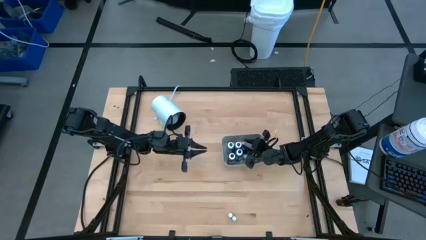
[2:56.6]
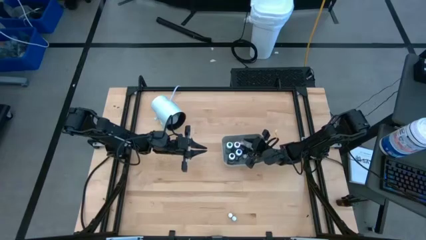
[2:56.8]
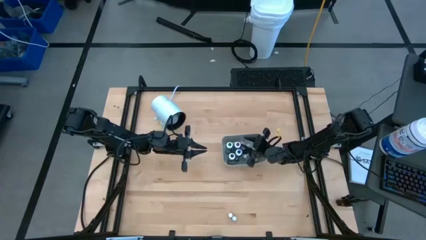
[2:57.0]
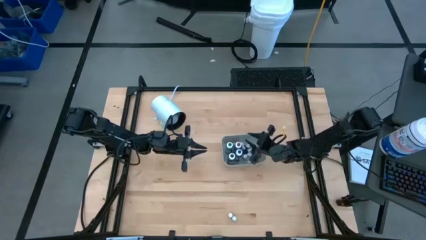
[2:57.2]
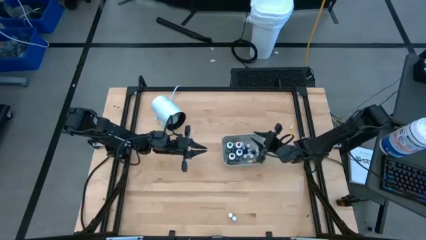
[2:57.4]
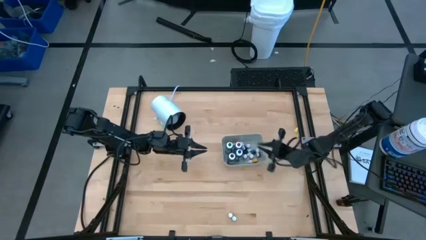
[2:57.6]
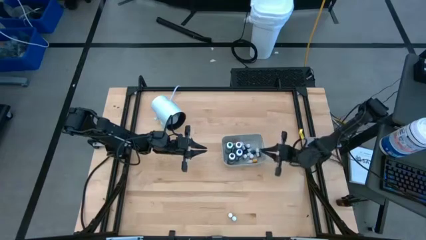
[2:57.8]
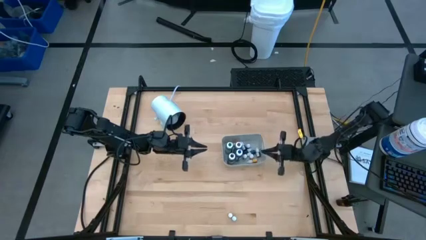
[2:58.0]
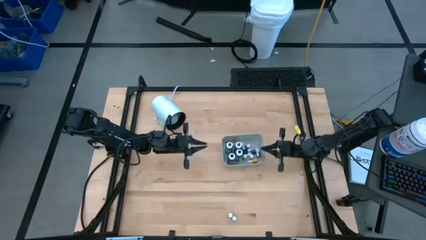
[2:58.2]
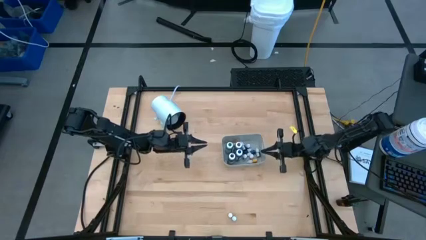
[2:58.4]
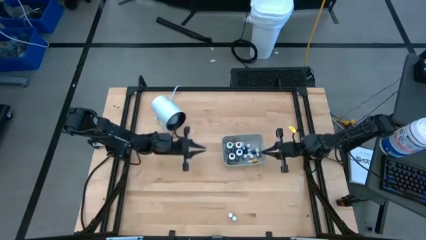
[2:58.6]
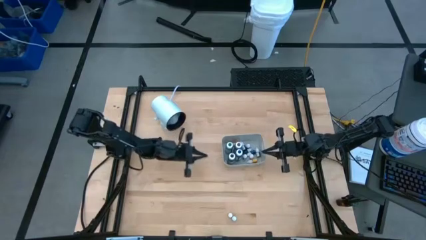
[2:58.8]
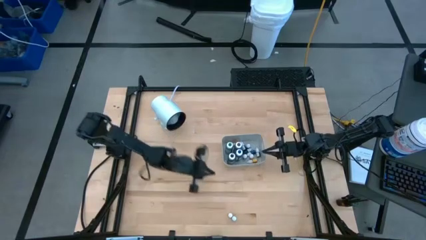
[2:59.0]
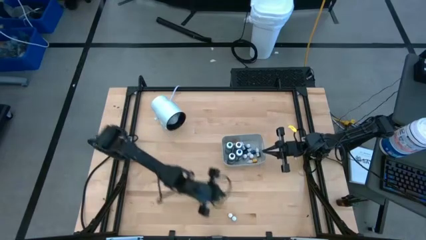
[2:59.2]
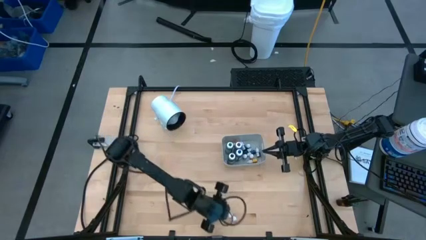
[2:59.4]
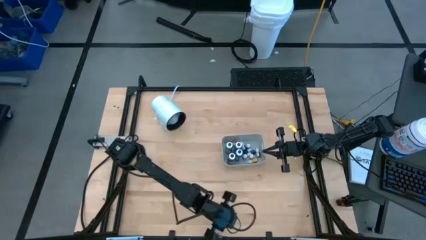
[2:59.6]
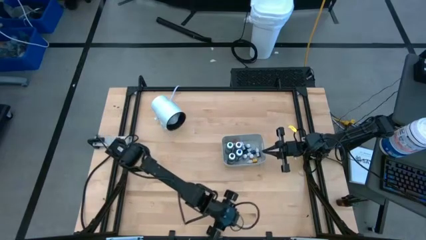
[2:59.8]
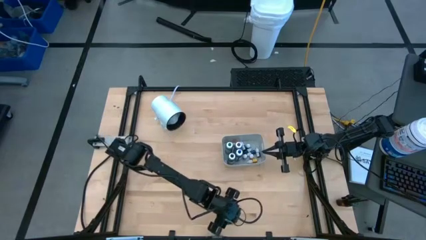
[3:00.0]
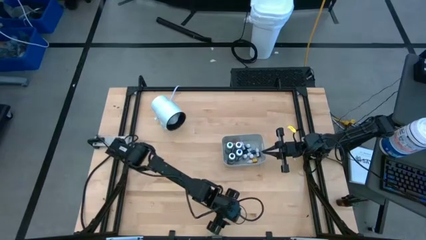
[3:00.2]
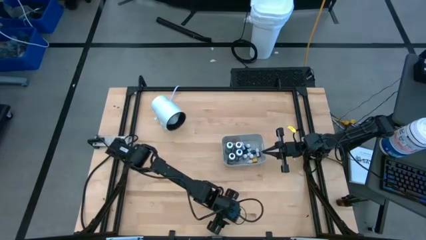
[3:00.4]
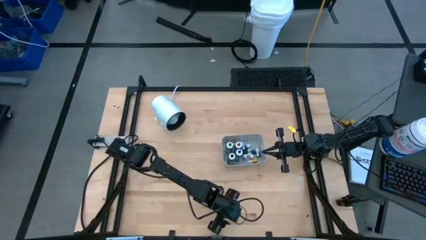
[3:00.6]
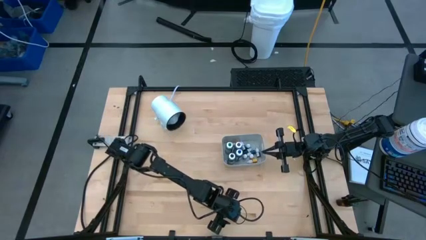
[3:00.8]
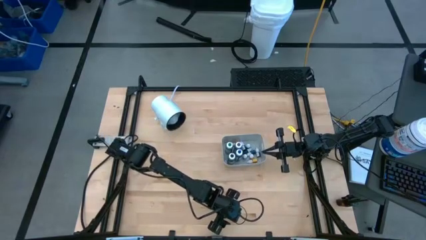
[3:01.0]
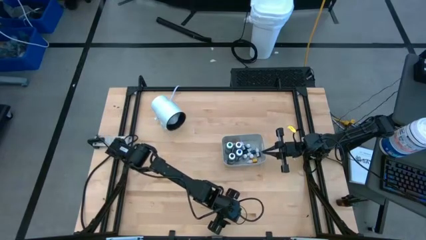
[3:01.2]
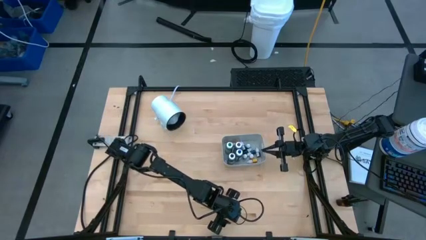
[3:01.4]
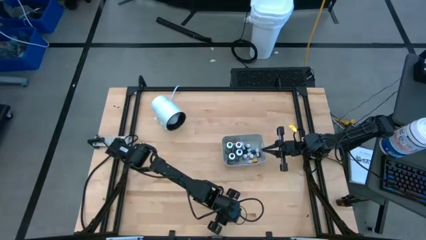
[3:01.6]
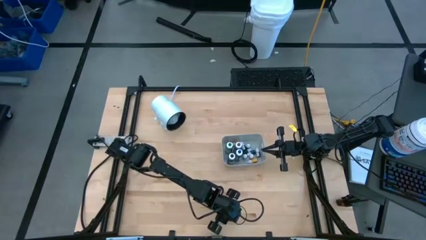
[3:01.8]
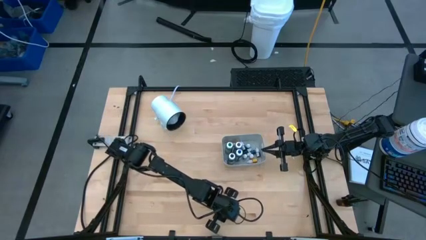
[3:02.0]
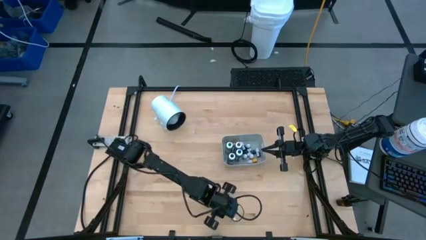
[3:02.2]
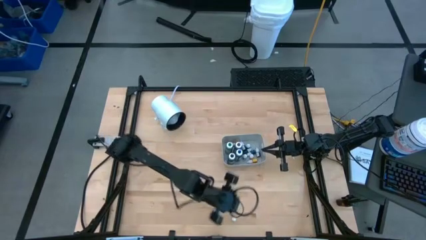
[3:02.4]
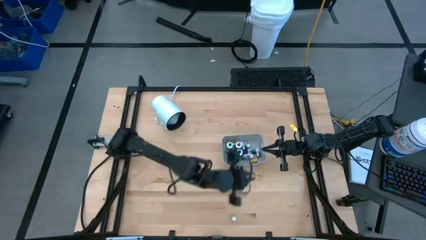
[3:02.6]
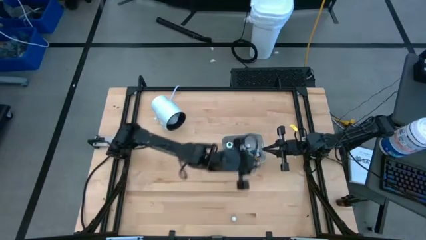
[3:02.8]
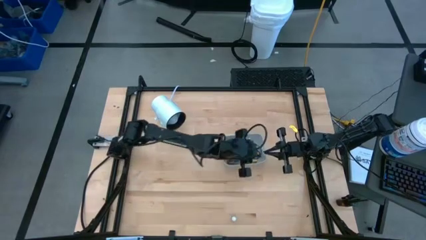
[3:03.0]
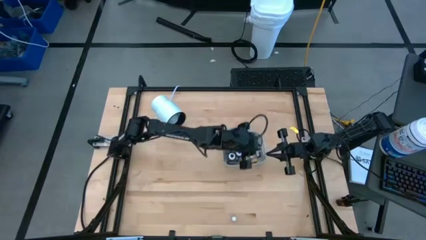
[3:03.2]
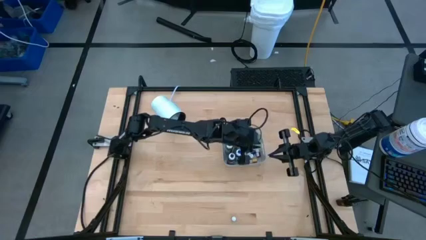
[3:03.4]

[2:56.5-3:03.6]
Task: Pick & Place food coloring
Put the small yellow food coloring bottle into the gray bin

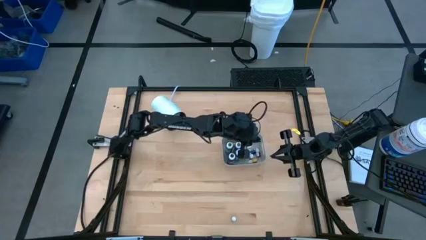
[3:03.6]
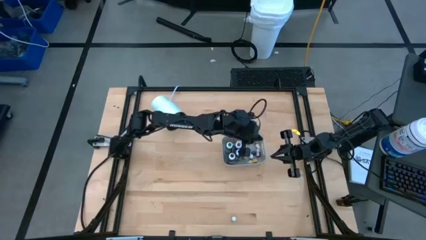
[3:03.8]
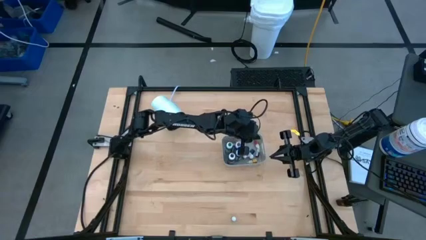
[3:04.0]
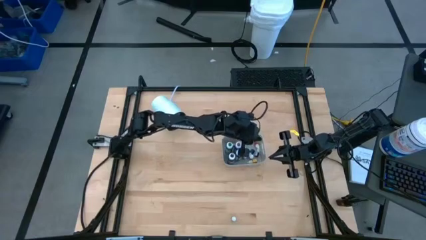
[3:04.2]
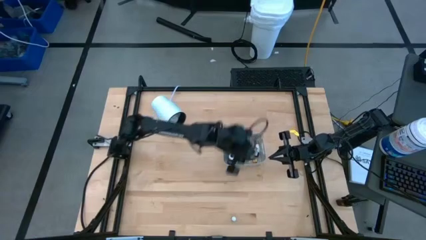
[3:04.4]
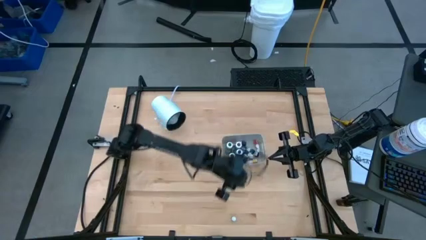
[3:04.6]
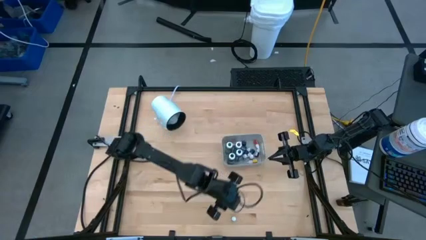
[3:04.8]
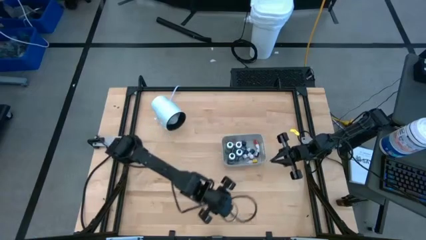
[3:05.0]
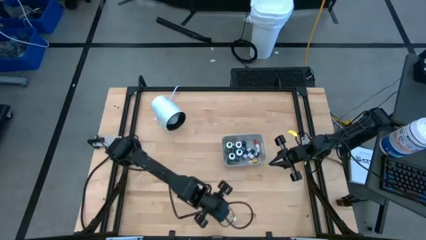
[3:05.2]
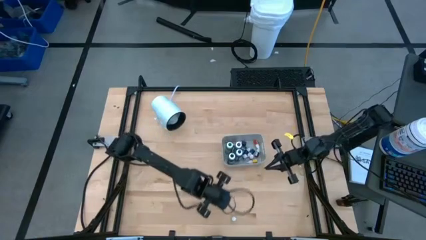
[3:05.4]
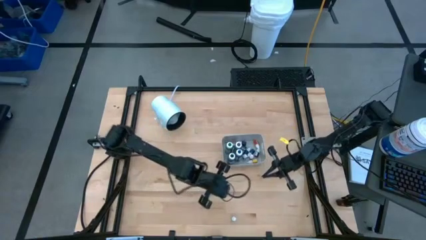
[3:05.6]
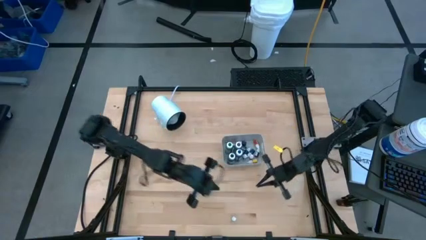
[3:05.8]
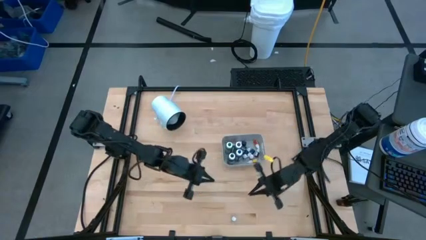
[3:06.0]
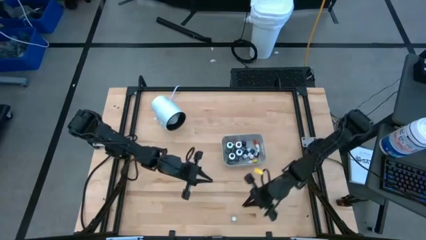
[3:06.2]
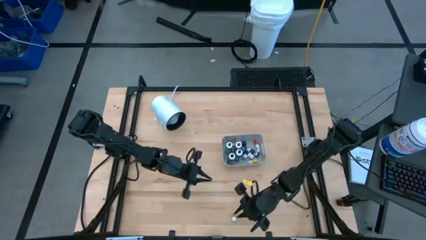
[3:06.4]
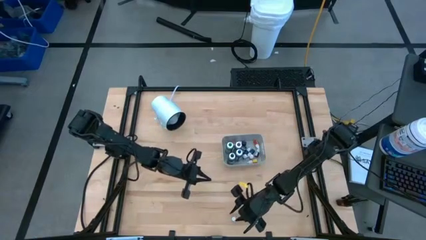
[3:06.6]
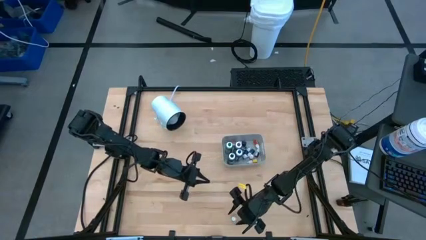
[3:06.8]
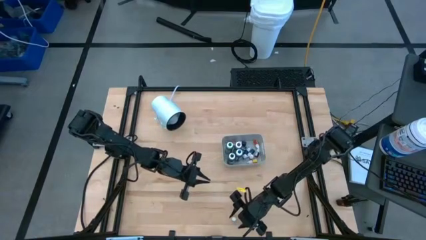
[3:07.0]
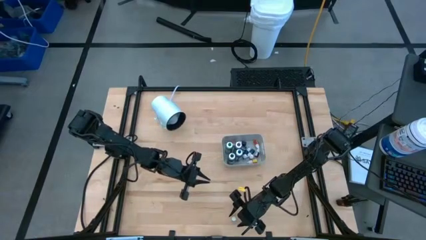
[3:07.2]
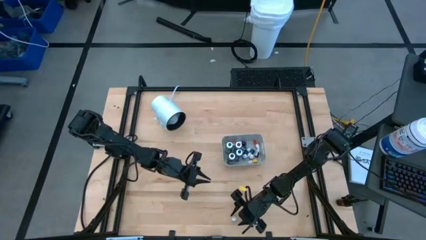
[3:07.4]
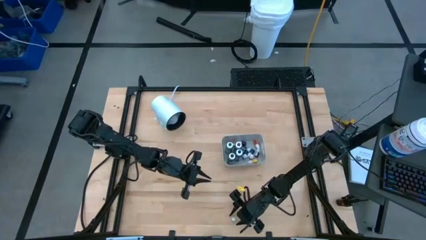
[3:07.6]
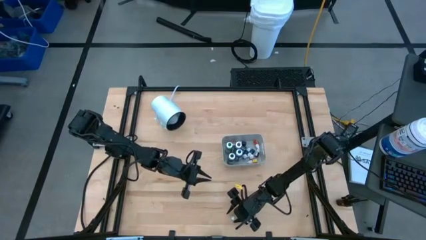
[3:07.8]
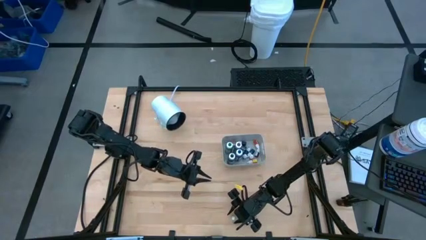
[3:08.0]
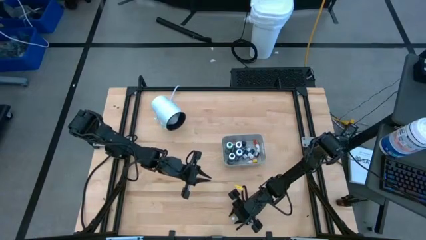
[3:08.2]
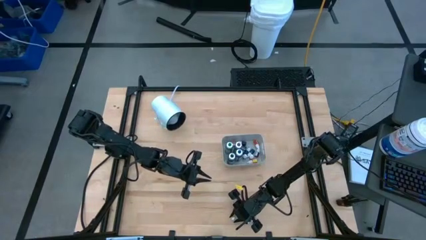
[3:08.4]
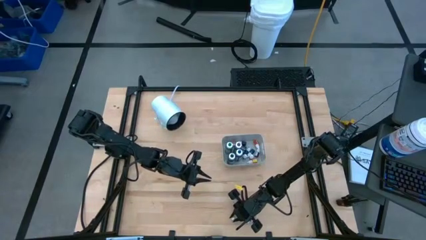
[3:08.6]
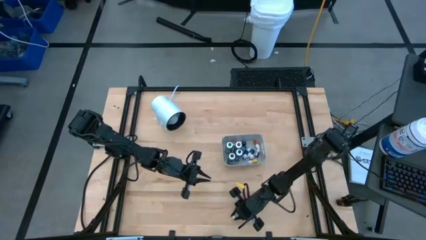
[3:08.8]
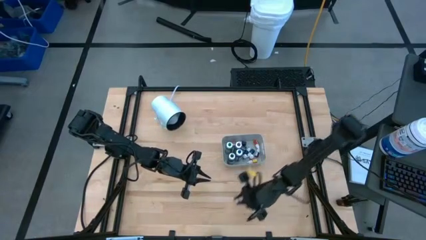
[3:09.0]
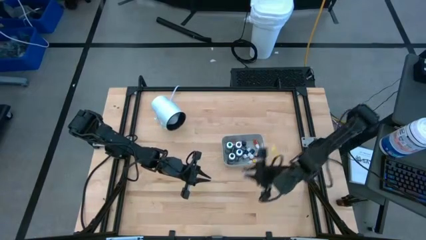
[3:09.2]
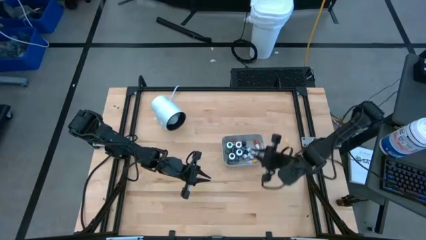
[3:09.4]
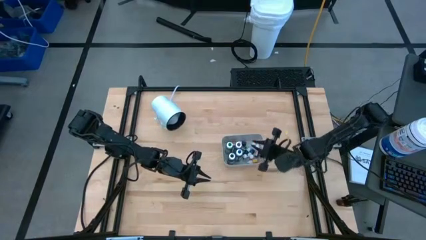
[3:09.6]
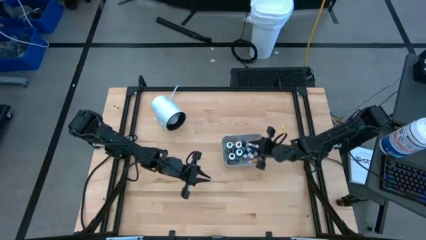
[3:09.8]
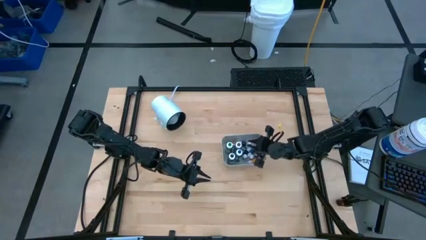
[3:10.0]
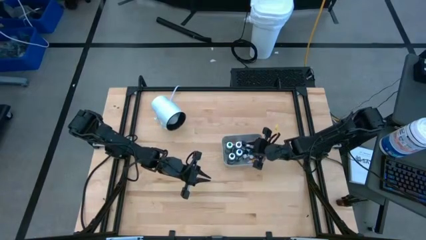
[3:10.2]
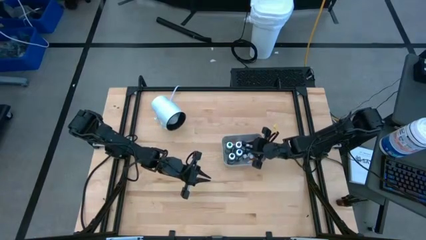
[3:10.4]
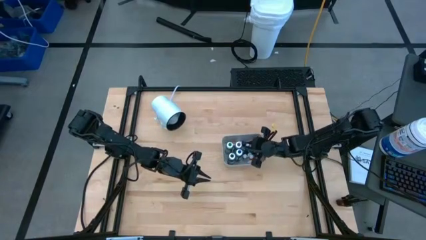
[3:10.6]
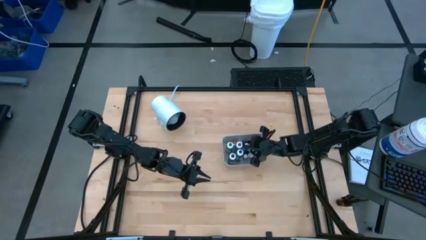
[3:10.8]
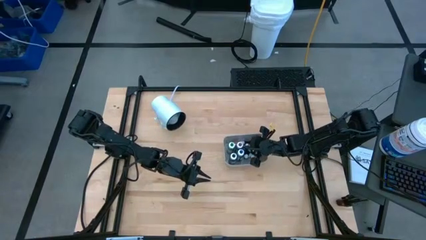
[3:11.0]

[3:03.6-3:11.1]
Put the small blue food coloring bottle into the gray bin

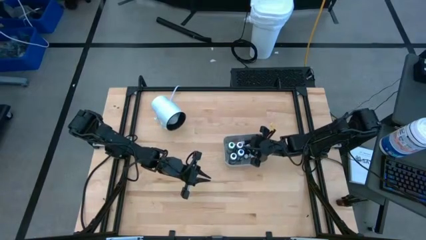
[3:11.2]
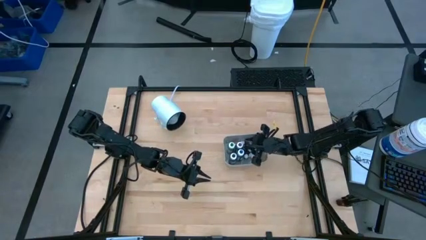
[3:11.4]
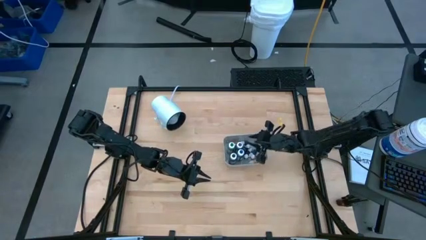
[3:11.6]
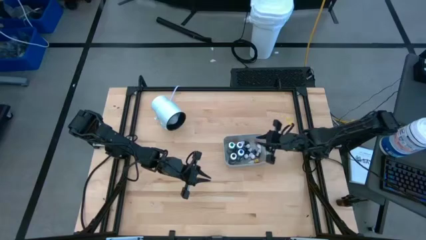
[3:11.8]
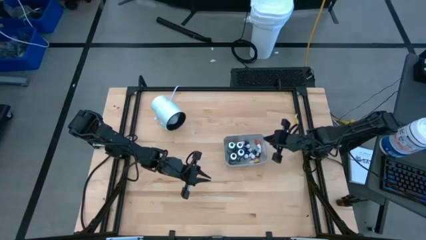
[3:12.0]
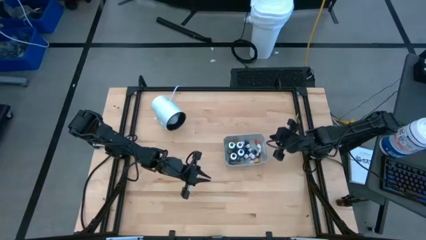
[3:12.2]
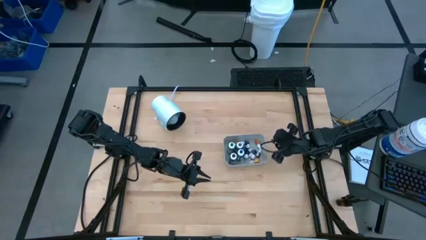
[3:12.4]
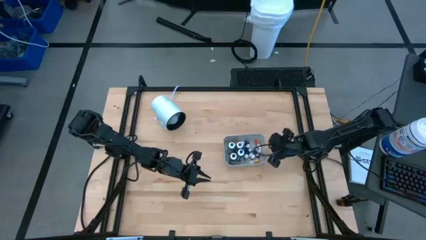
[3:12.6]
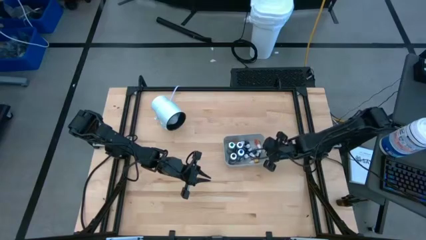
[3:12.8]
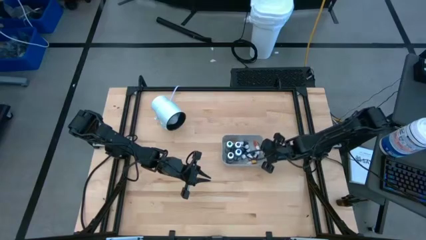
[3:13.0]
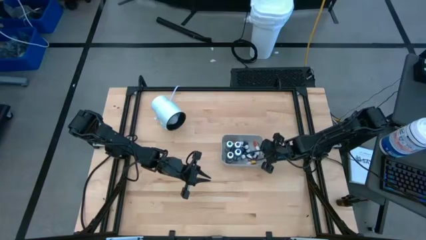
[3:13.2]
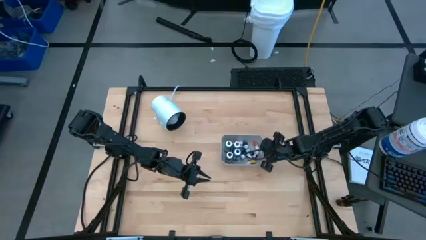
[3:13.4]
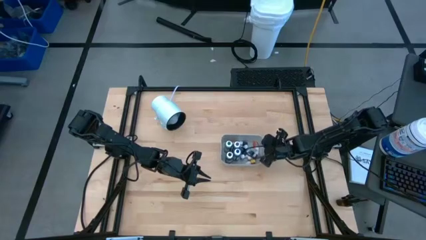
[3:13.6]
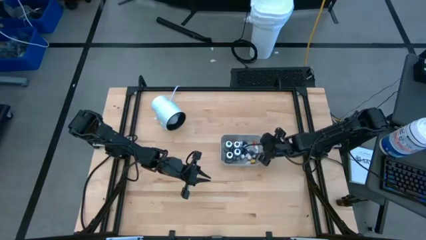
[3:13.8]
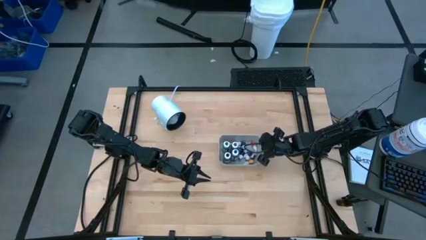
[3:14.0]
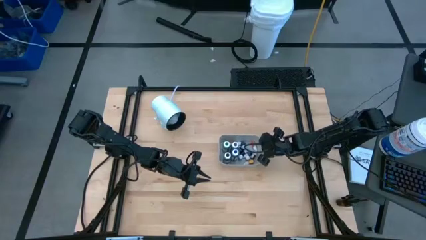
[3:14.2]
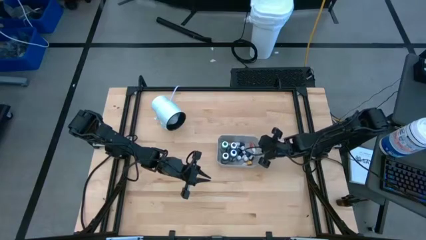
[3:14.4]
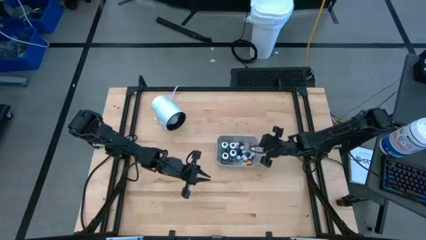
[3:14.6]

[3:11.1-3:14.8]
Adjust the gray bin on the table
